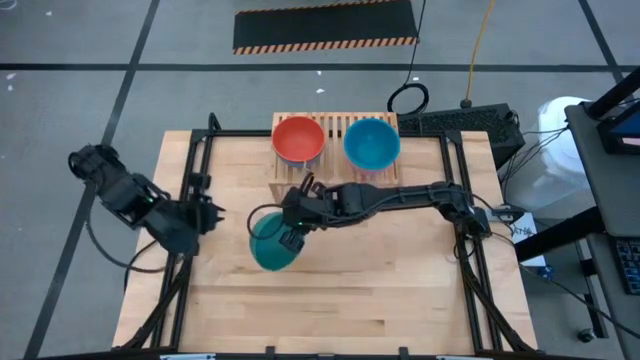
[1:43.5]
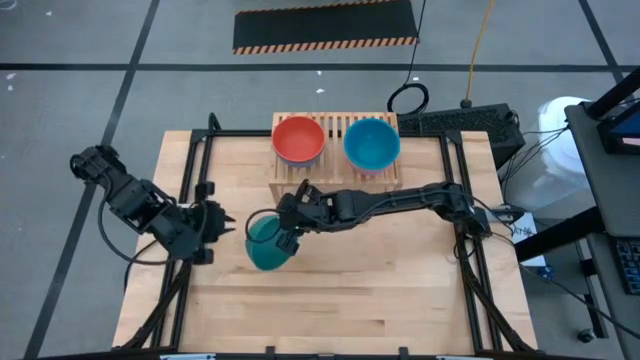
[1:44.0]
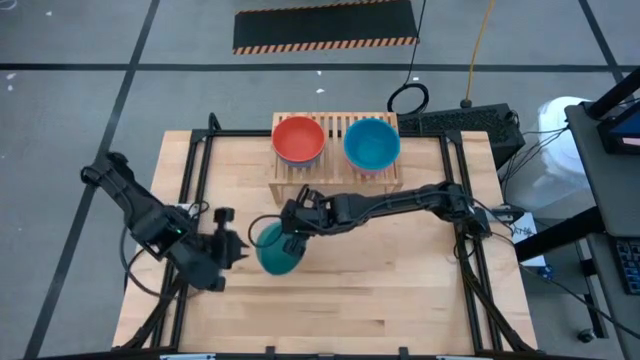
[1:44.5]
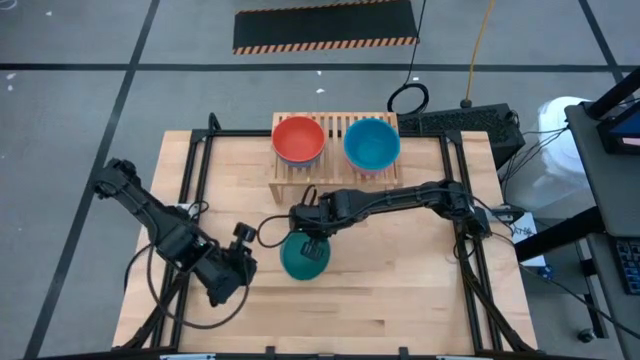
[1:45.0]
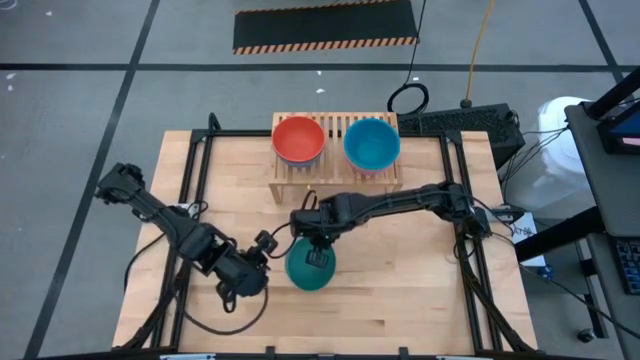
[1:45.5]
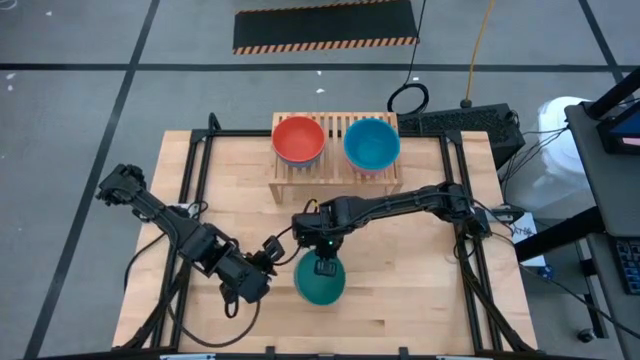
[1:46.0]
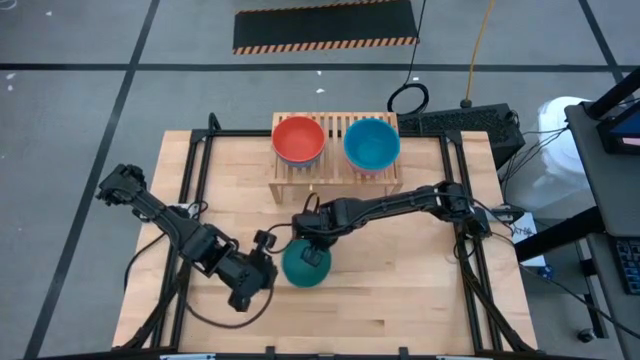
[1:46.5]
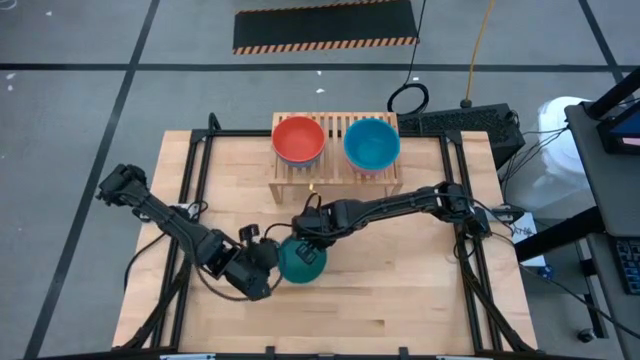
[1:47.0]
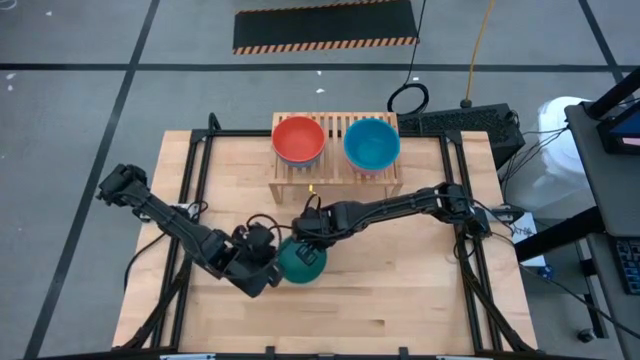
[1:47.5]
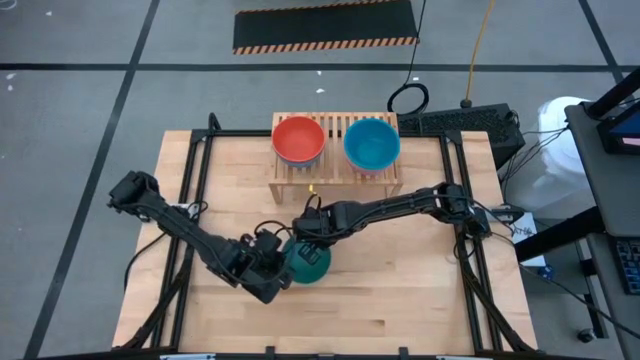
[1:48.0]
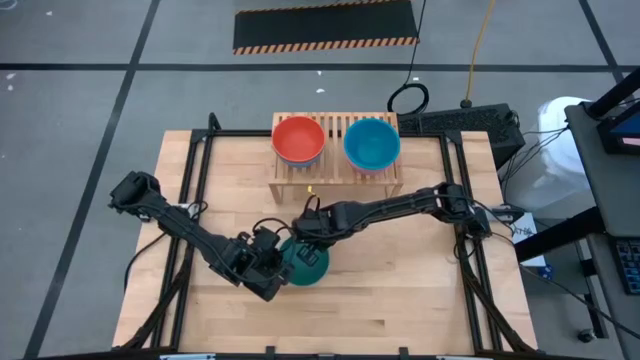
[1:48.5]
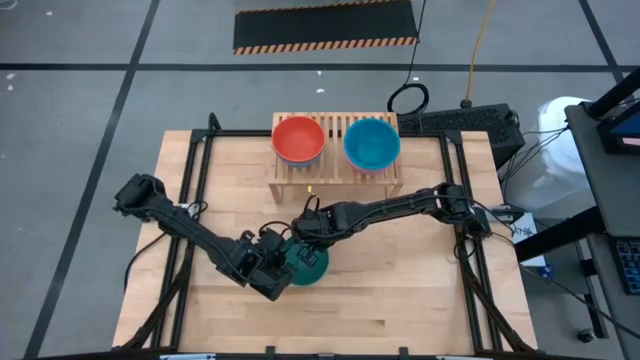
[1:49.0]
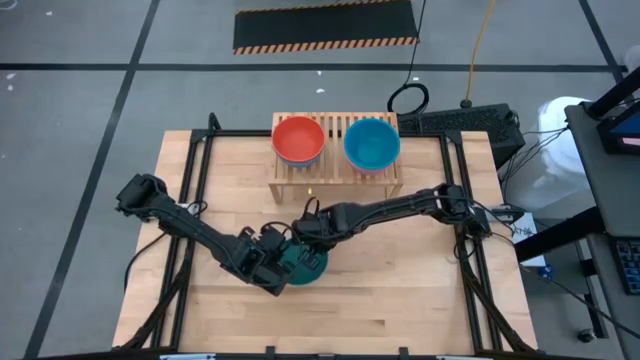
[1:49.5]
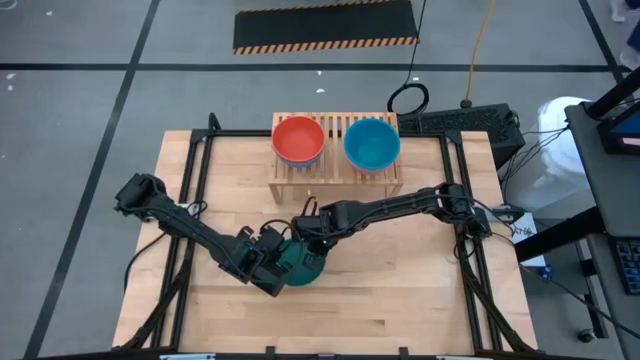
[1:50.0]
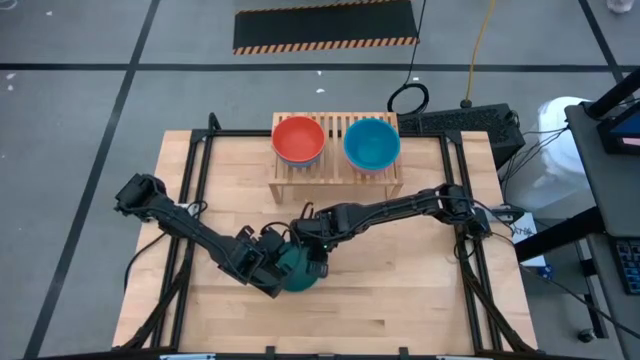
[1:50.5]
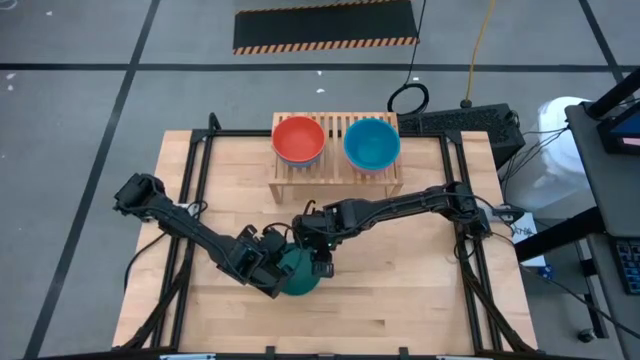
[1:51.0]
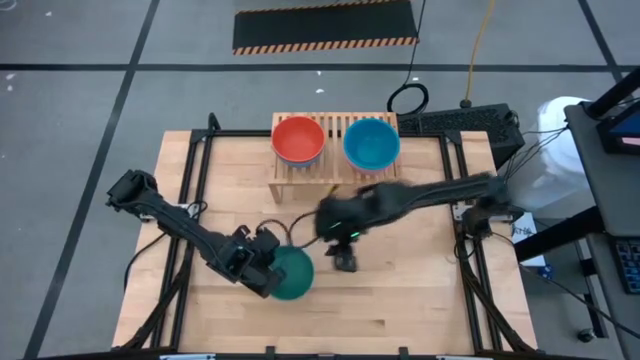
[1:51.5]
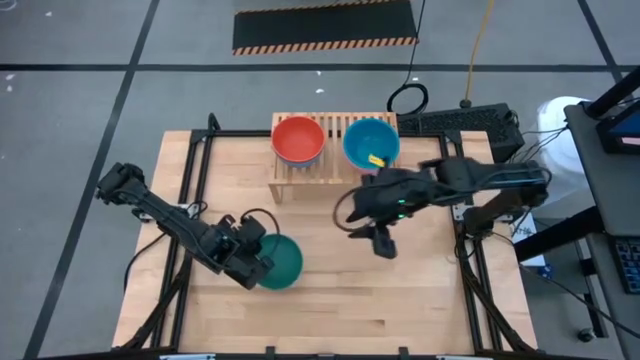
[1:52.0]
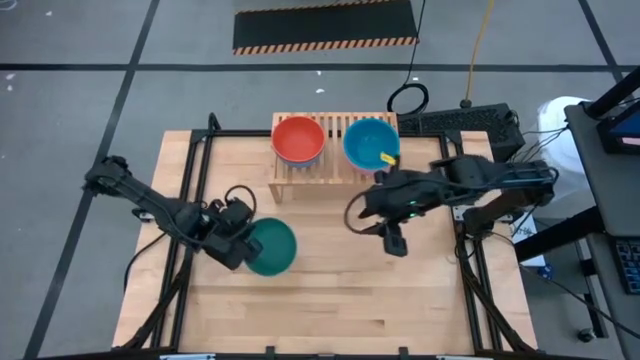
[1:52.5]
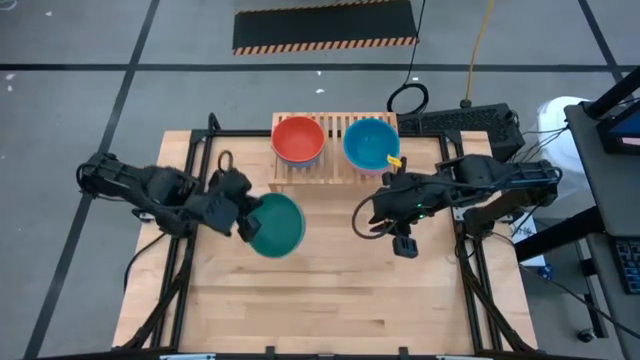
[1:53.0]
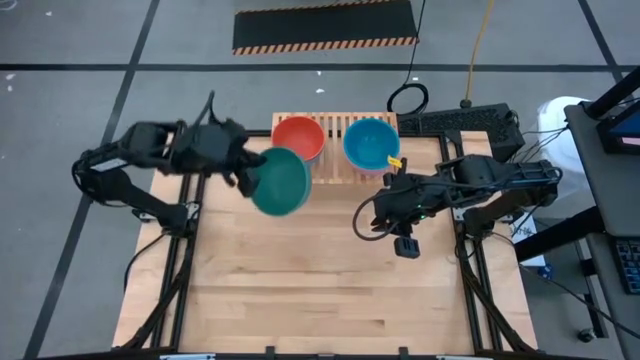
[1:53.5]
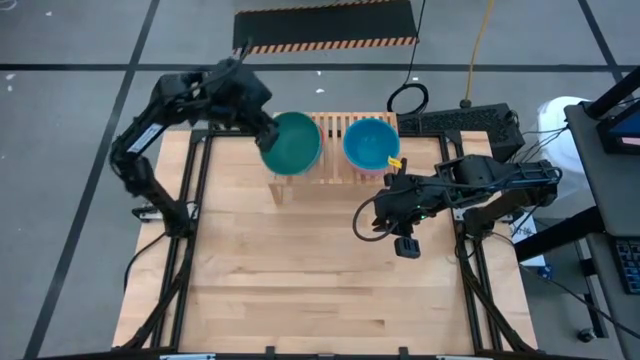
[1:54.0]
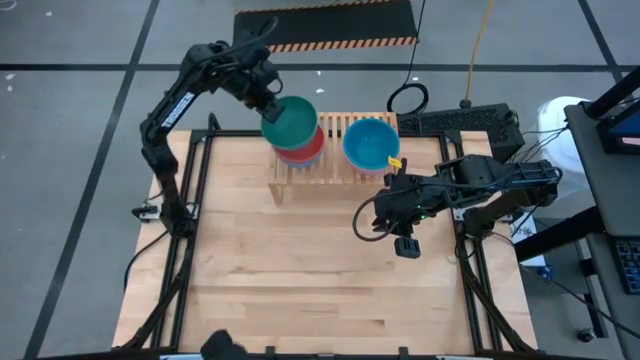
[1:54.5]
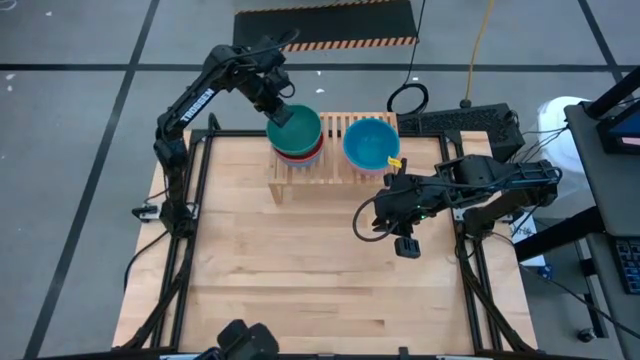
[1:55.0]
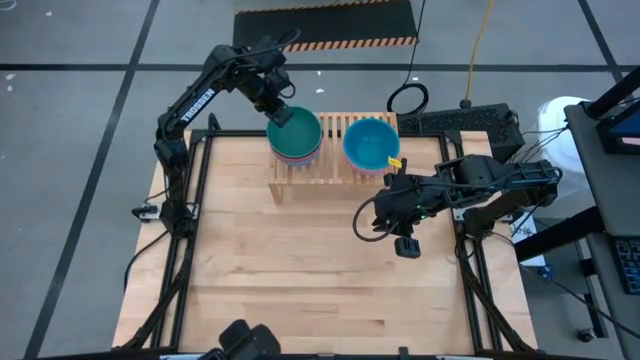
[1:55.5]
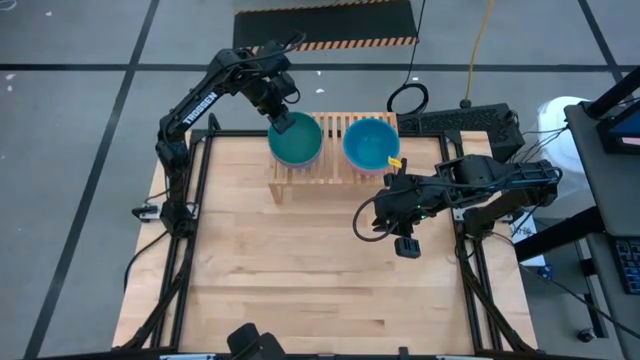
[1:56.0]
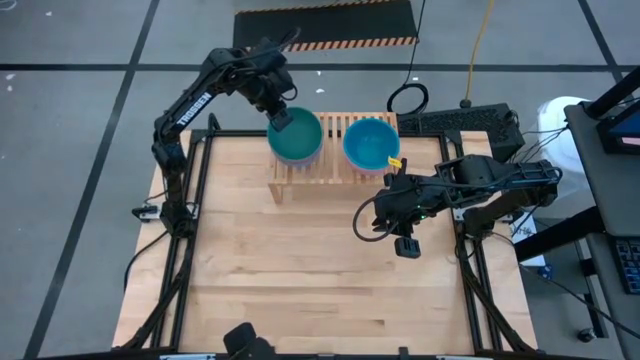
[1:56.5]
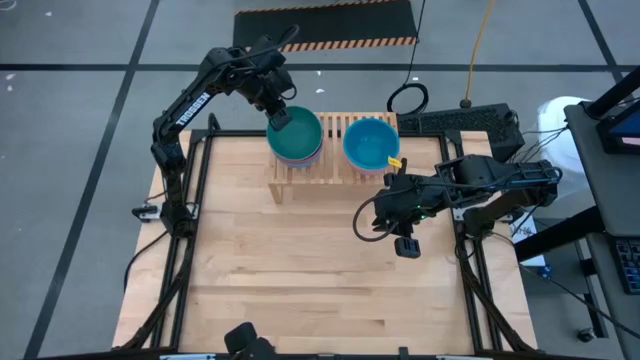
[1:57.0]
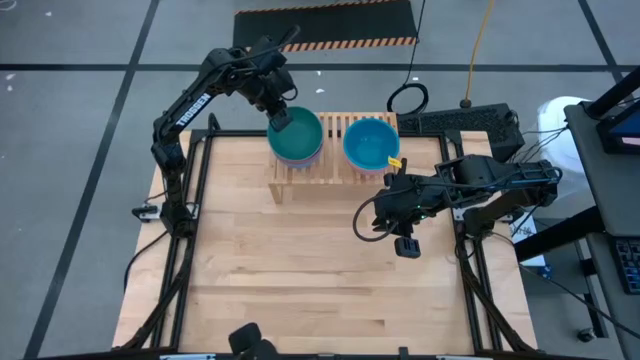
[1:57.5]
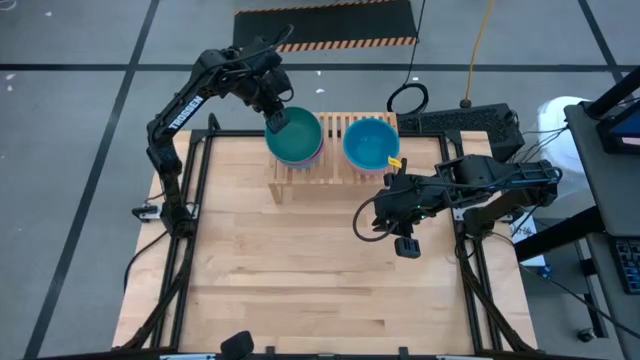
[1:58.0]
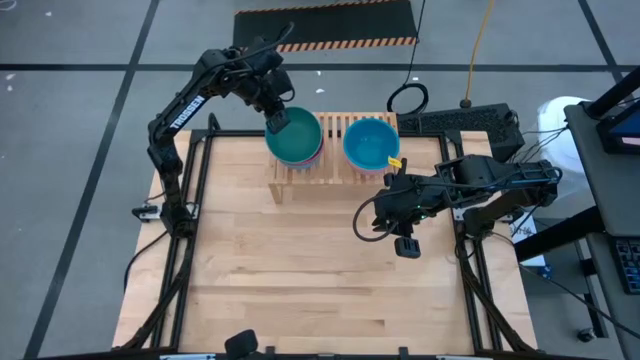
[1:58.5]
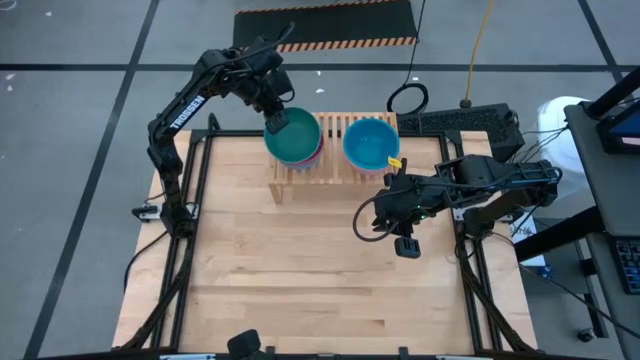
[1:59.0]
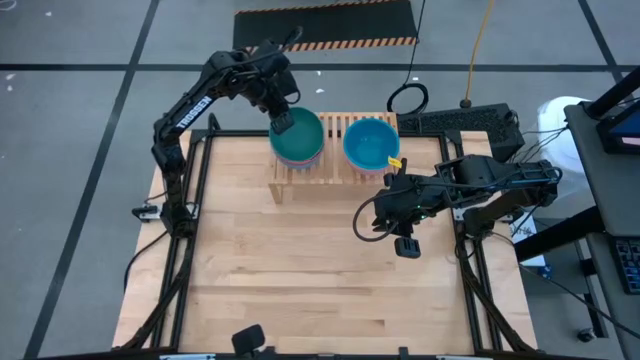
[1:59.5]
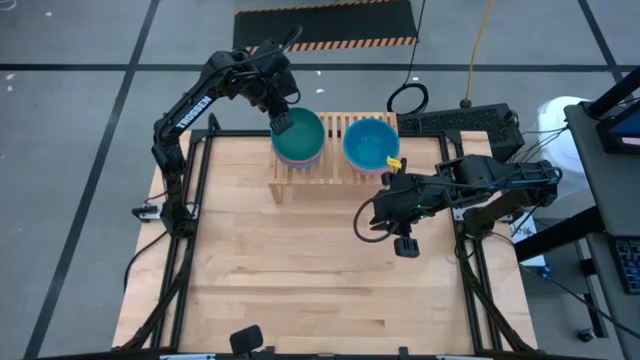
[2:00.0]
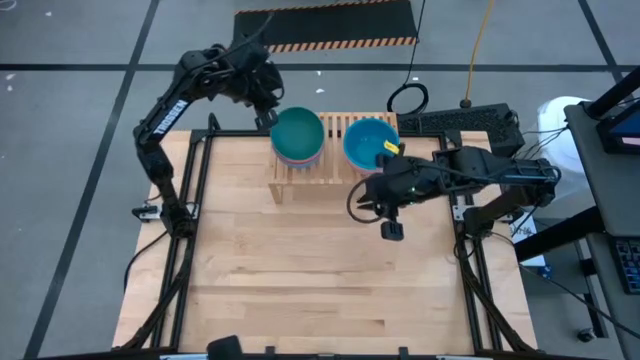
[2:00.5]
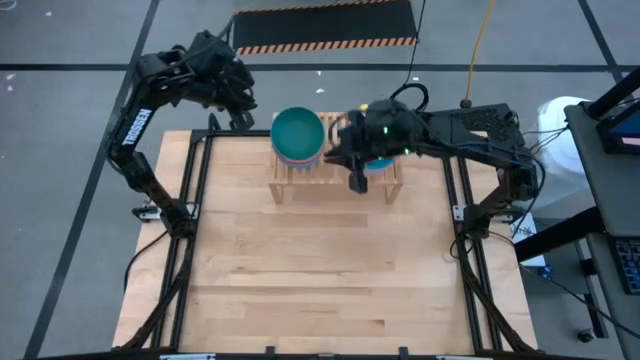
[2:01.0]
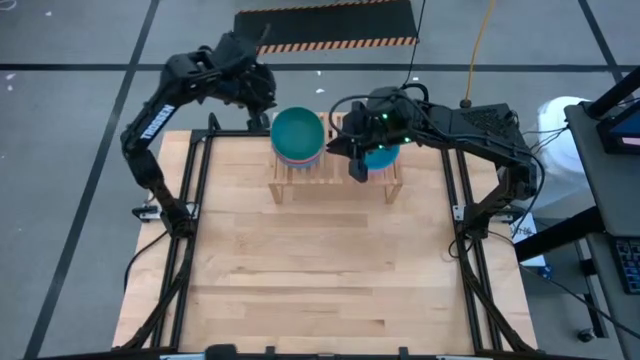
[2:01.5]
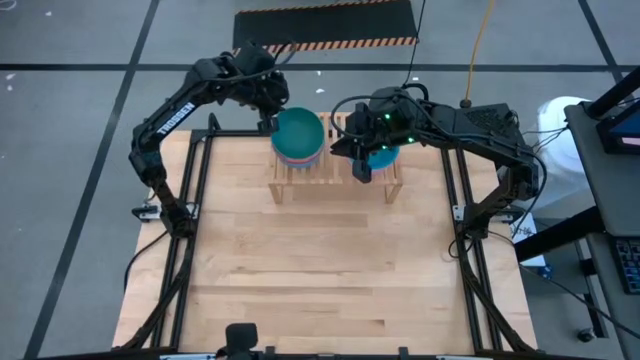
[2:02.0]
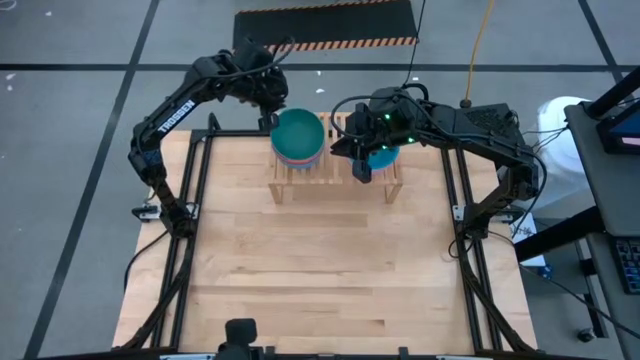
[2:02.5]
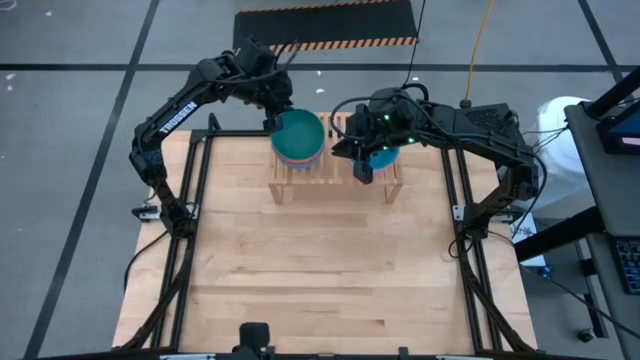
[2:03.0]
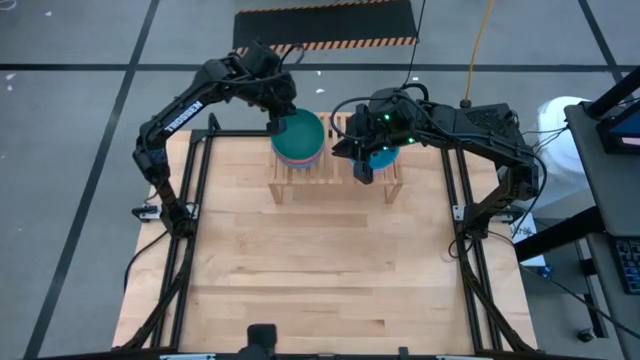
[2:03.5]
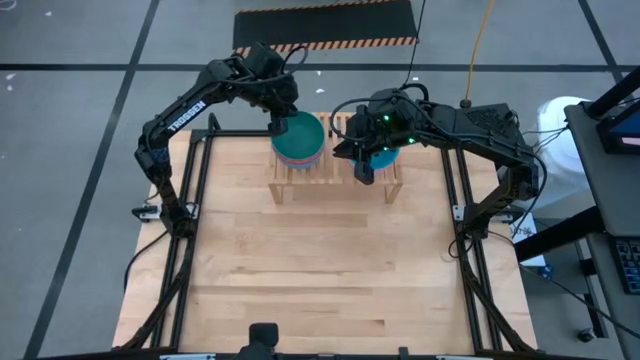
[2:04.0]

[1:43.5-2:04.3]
Task: Place and stack bowls onto a shelf
Stack the green bowl on top of the orange bowl on the shelf
